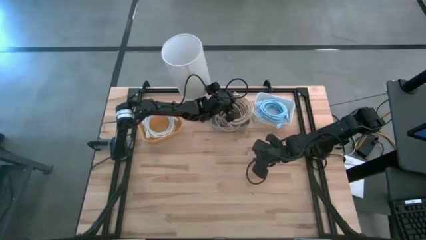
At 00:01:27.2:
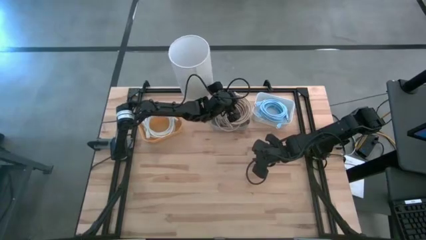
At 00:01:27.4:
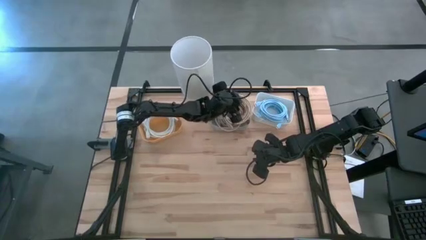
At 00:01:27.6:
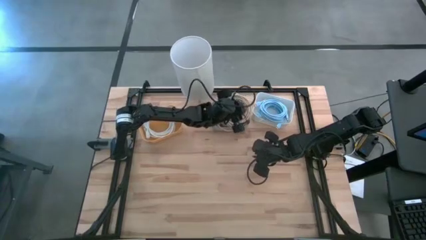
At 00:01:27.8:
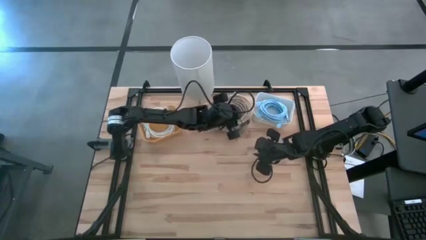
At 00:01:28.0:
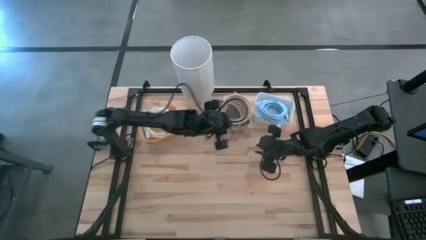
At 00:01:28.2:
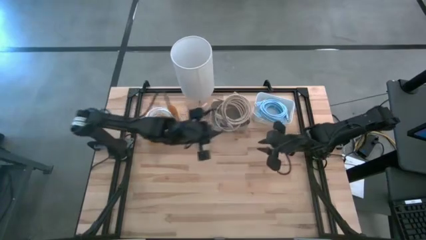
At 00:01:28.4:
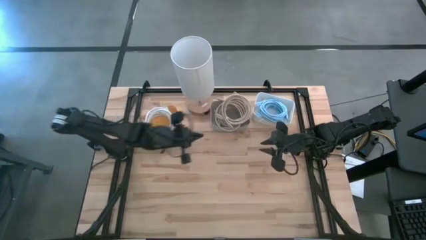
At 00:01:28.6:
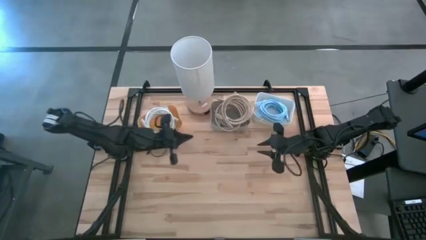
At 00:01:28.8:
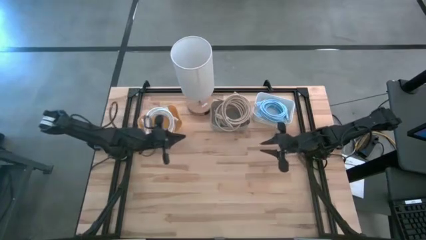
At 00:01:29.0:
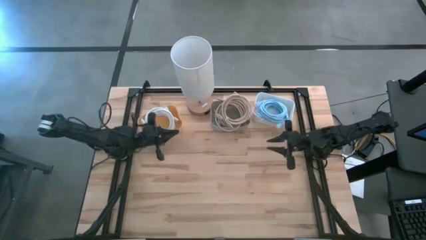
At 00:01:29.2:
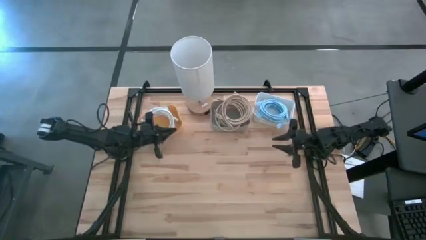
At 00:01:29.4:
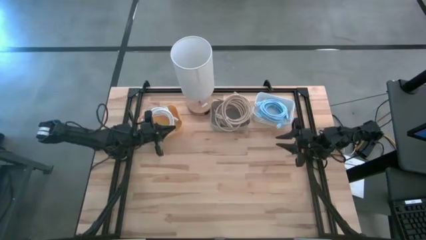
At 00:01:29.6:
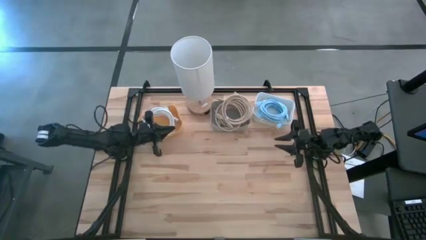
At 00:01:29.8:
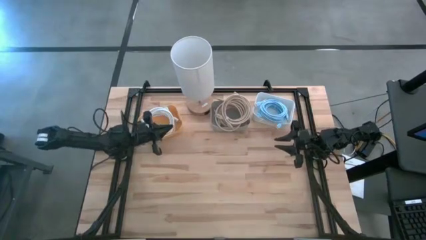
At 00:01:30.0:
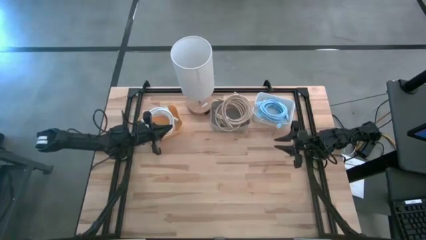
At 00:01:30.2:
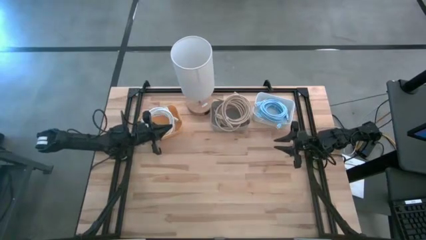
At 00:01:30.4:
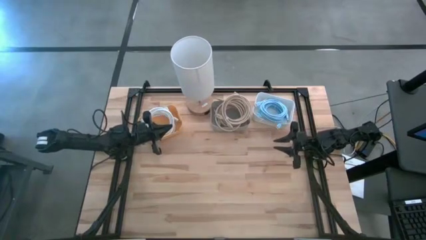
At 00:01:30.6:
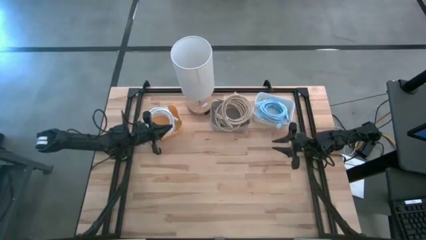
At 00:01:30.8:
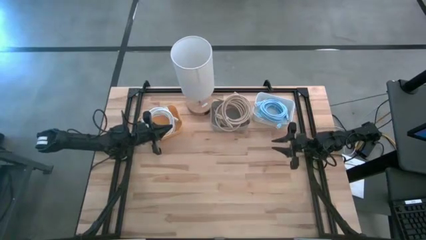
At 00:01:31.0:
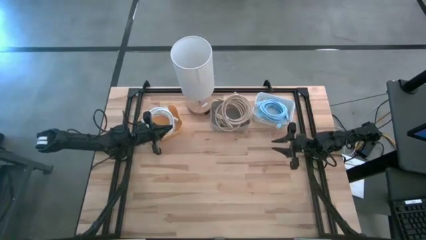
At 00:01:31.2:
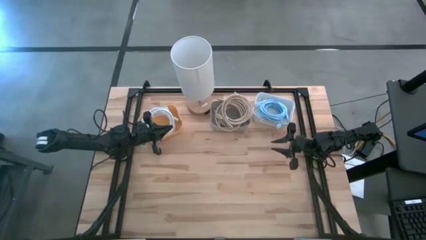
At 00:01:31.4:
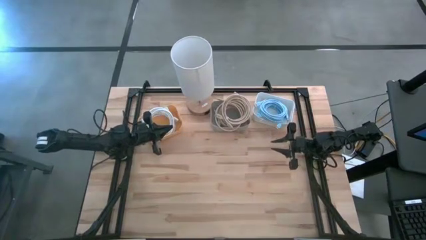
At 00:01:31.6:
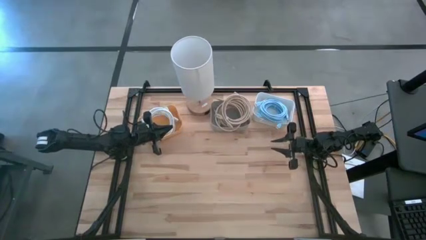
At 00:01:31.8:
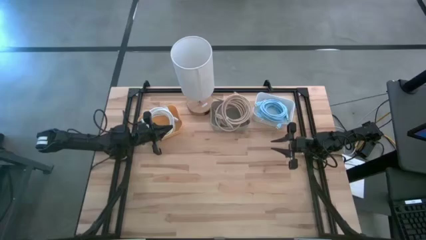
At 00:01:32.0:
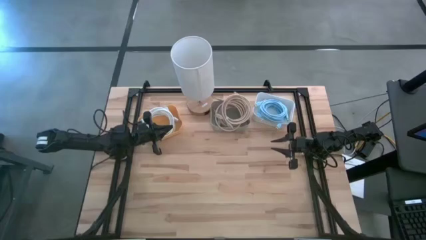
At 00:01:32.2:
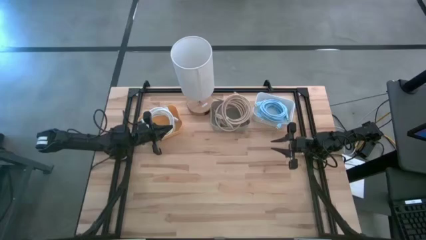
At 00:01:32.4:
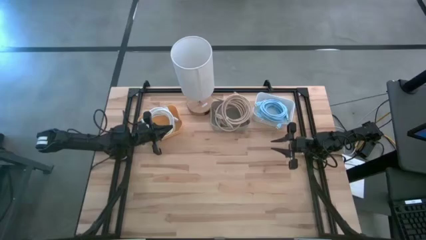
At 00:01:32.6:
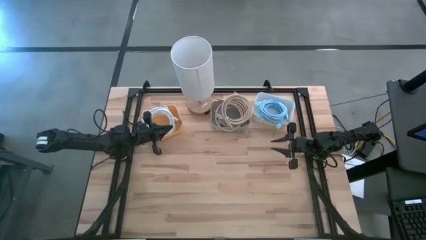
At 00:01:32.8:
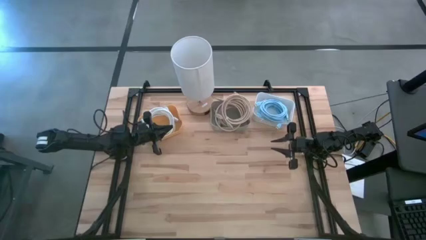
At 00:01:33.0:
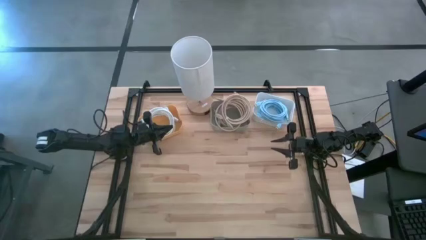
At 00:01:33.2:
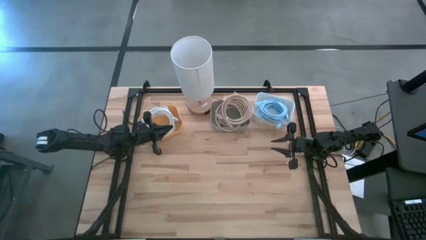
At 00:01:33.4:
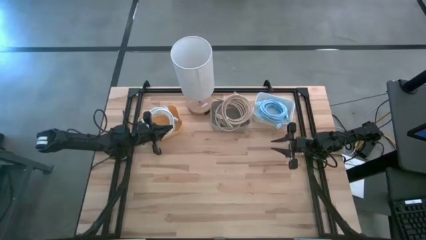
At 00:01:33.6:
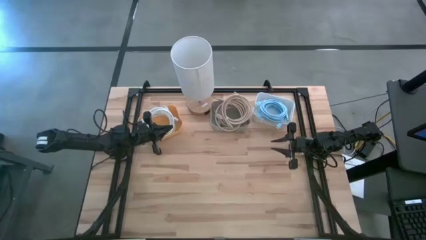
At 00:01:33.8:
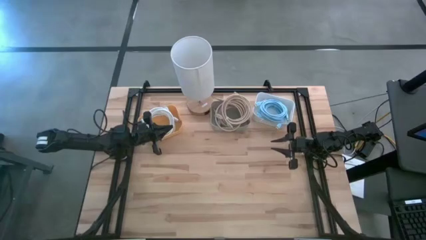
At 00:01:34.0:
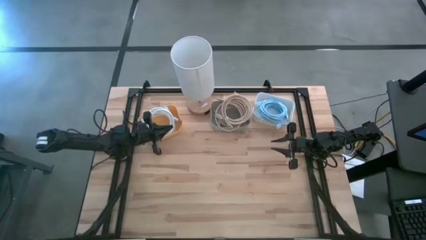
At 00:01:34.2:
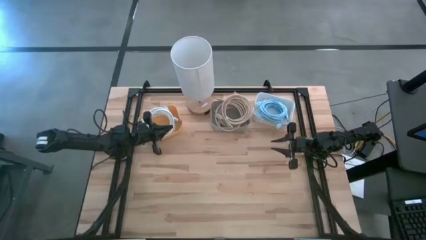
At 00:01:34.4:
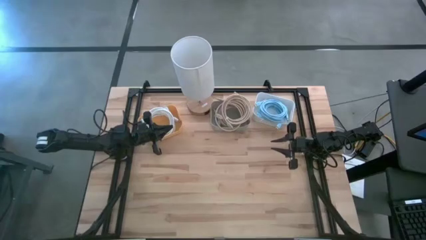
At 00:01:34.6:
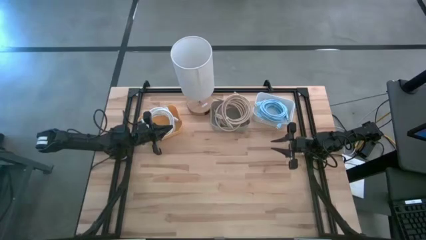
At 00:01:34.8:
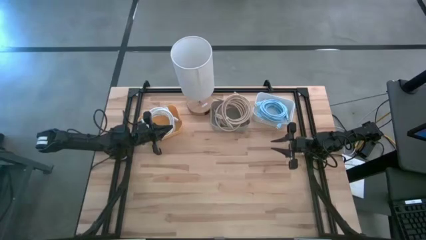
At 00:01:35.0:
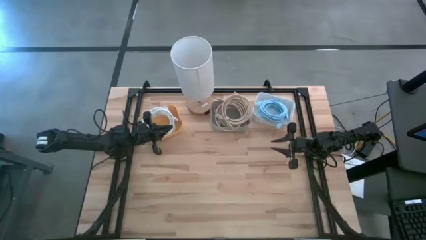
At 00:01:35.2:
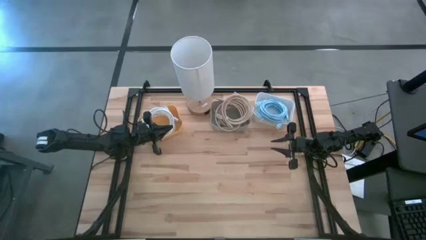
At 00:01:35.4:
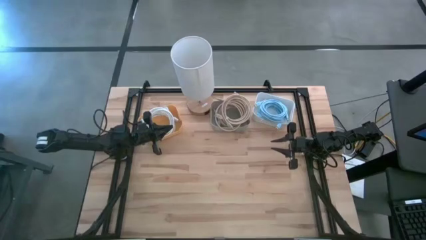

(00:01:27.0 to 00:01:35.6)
Task: Sort HDMI cables
Return to Home Position

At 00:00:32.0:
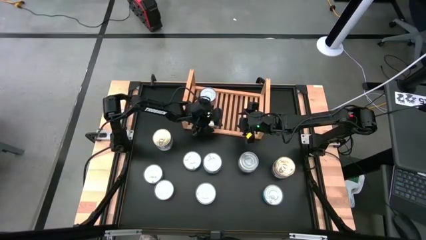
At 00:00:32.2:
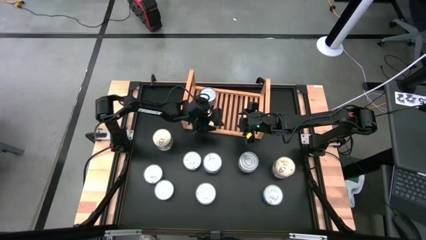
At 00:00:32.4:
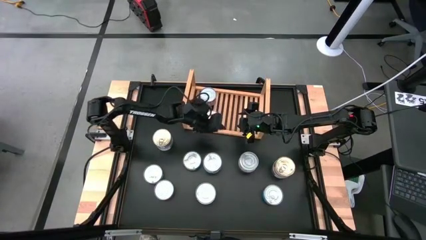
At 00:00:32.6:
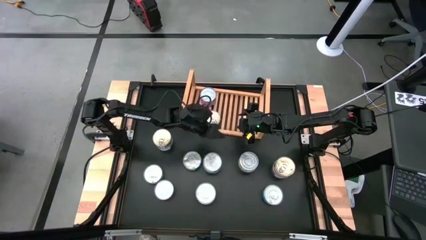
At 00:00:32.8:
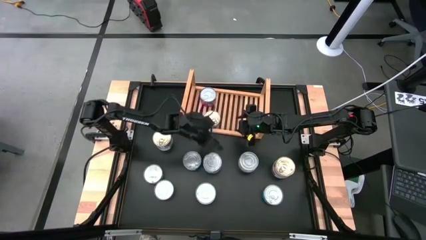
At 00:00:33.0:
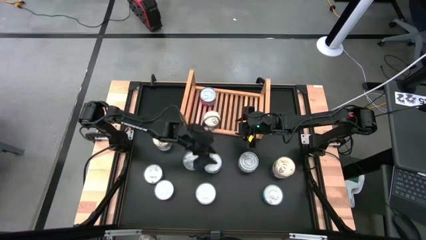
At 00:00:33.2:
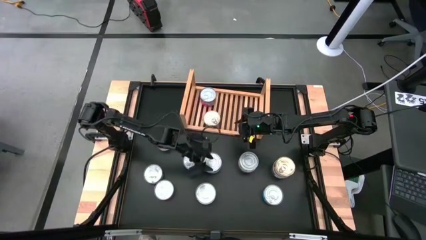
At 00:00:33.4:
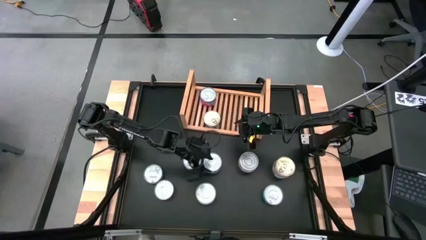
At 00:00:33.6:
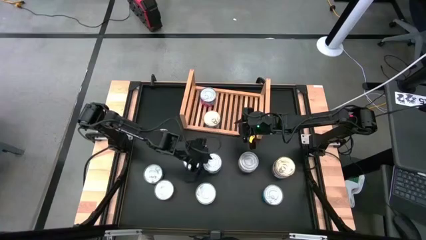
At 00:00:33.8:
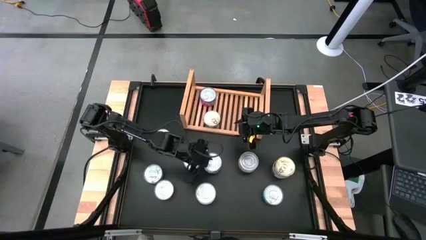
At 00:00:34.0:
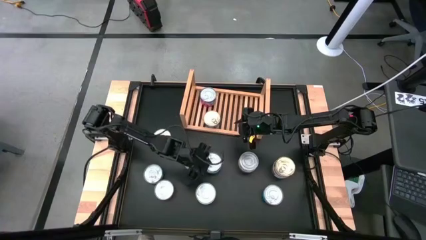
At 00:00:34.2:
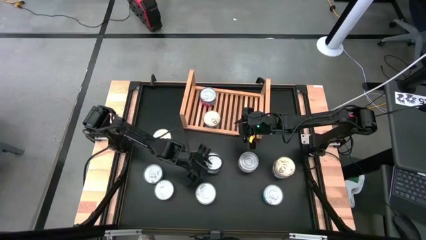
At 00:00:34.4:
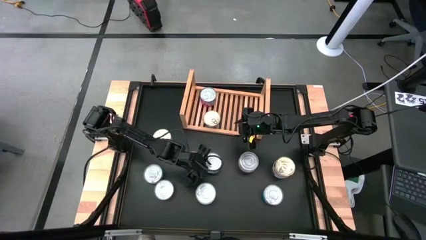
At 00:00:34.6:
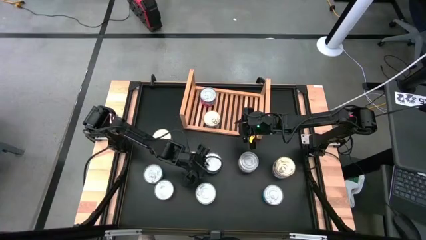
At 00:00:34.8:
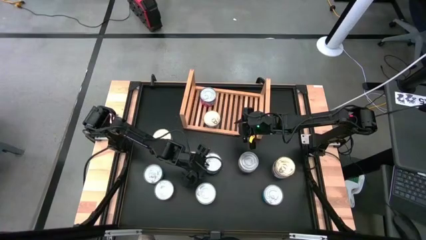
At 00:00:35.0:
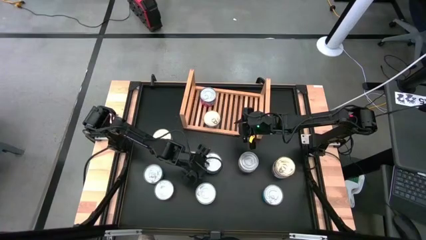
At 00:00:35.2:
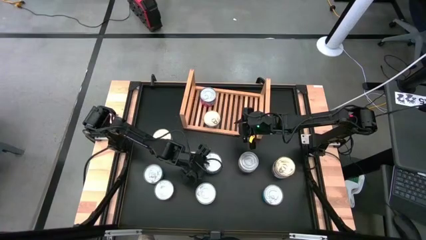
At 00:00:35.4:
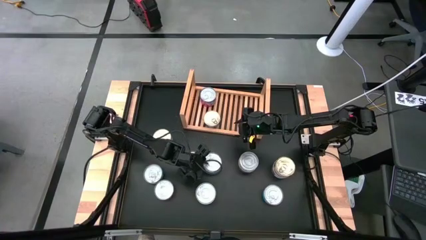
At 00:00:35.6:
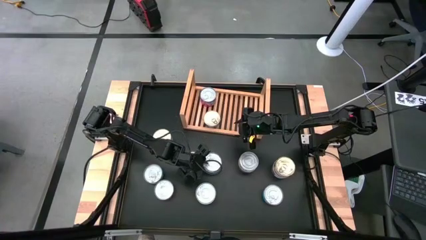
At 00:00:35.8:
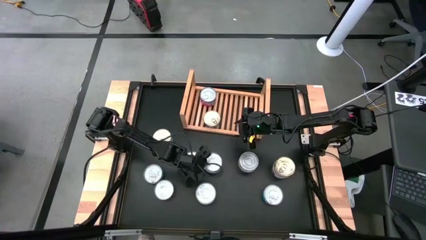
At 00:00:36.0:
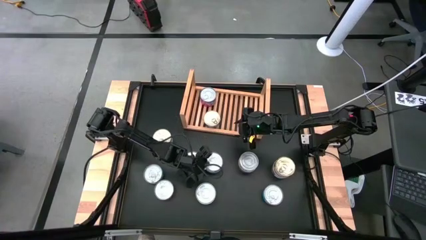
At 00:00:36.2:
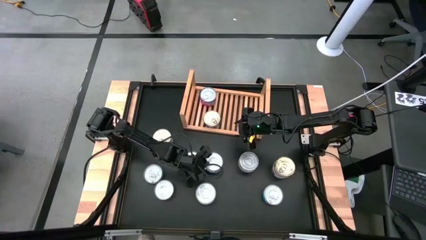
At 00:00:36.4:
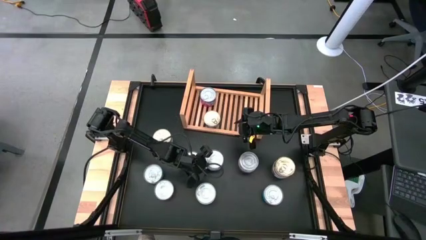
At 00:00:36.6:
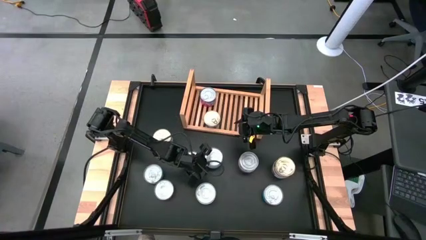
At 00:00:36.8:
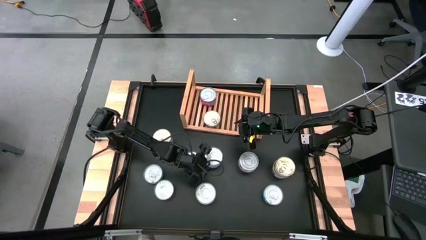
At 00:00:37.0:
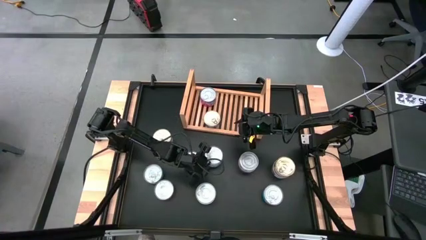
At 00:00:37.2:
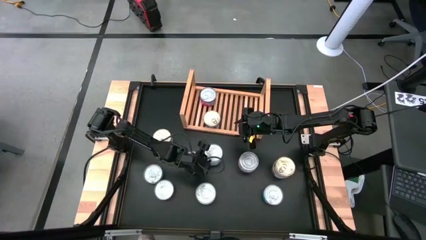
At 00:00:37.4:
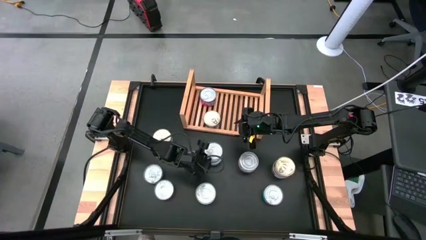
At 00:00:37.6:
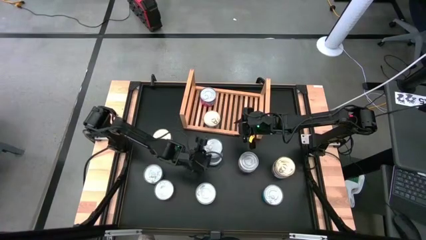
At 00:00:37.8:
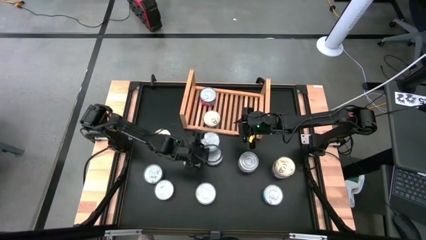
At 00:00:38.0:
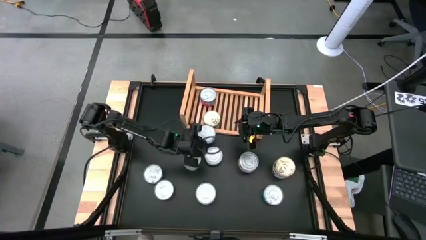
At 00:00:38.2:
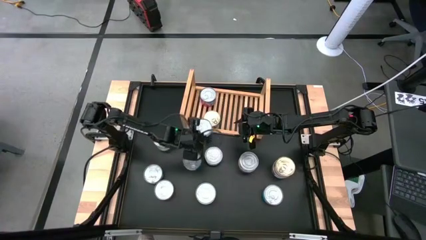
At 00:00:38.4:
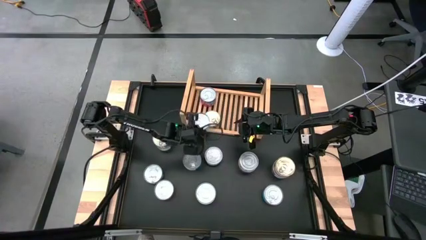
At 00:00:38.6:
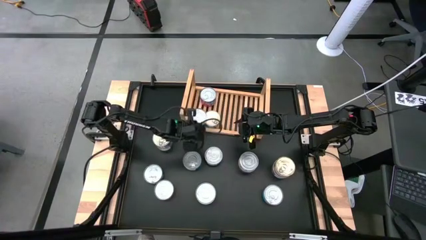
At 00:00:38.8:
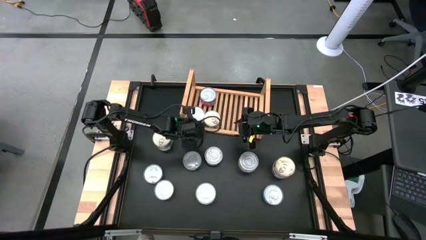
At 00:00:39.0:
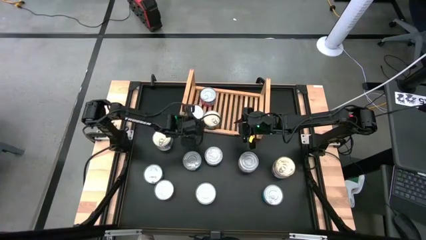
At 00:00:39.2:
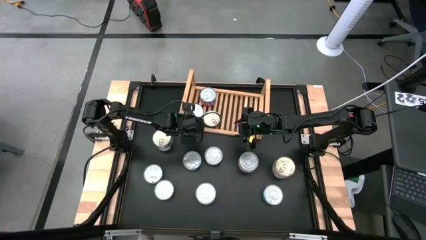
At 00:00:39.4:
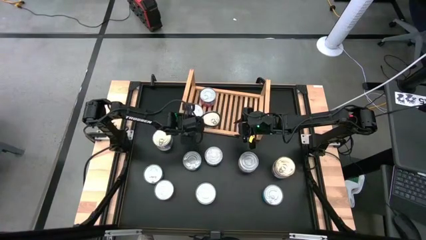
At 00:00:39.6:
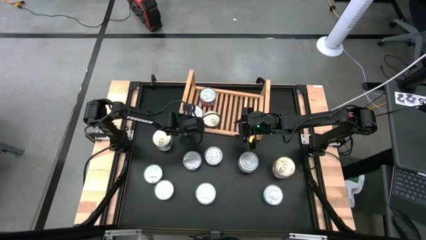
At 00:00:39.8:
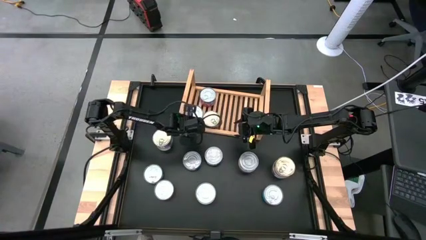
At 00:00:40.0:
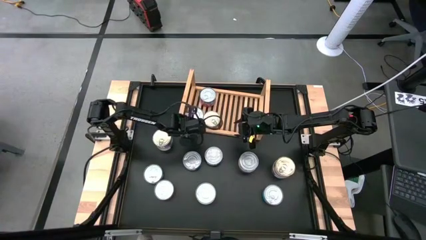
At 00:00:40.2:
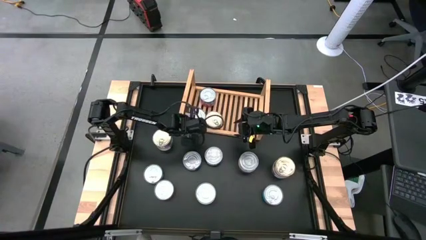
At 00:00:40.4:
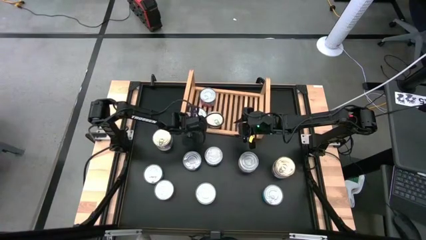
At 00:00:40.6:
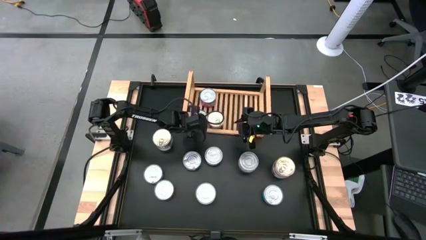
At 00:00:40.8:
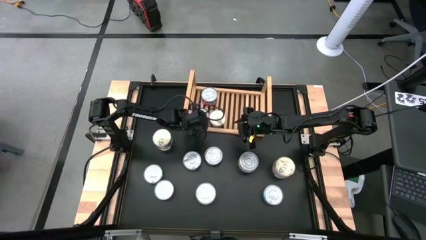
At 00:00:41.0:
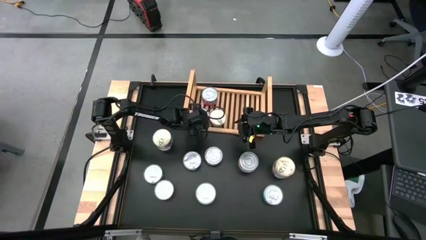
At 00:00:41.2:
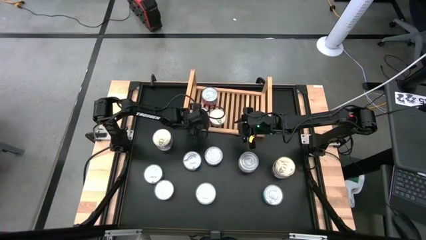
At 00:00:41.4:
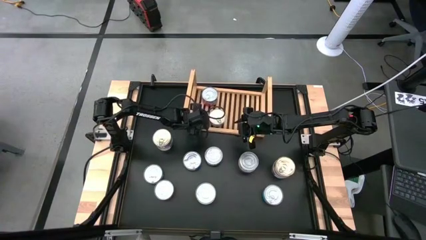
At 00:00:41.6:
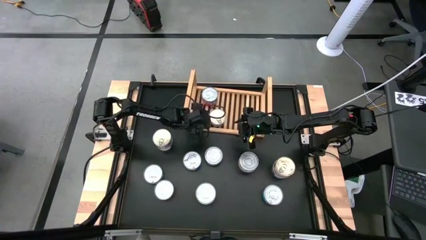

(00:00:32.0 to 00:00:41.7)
Task: Stack canned seafood by type on shelf
Put the light blue tuna can on the shelf
